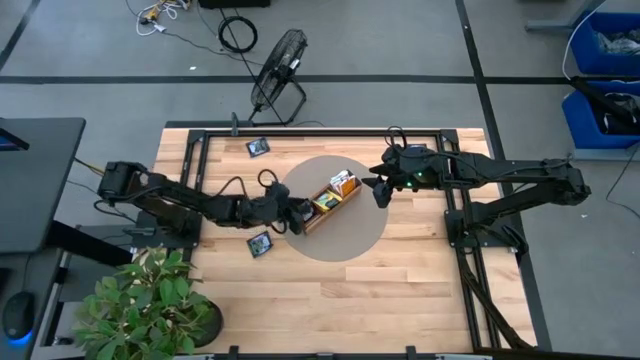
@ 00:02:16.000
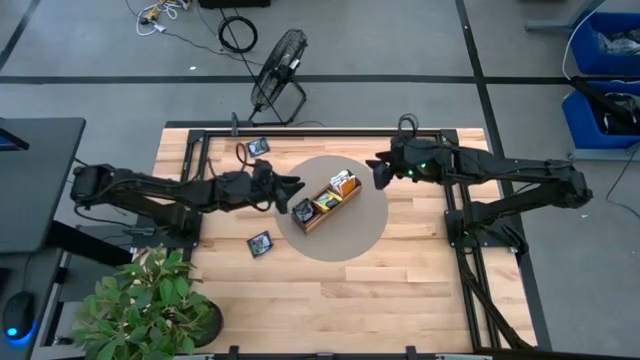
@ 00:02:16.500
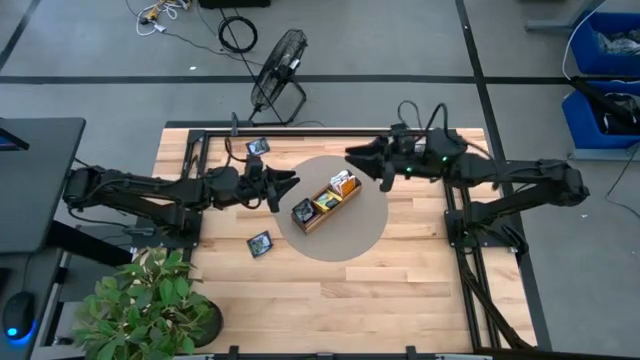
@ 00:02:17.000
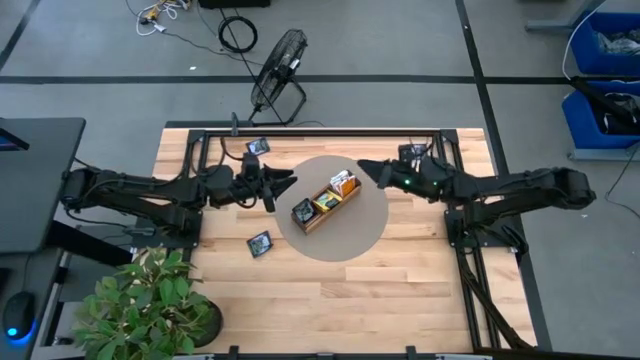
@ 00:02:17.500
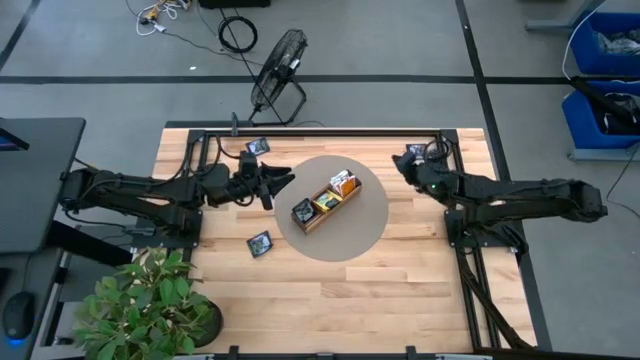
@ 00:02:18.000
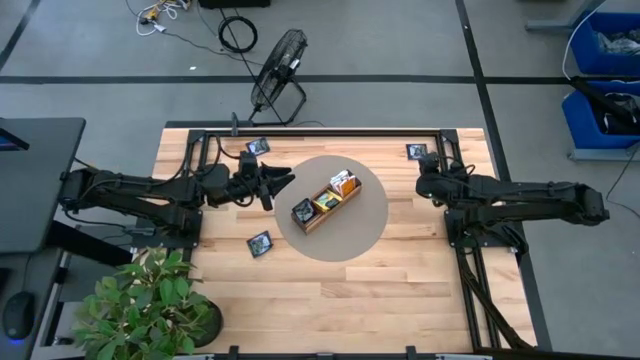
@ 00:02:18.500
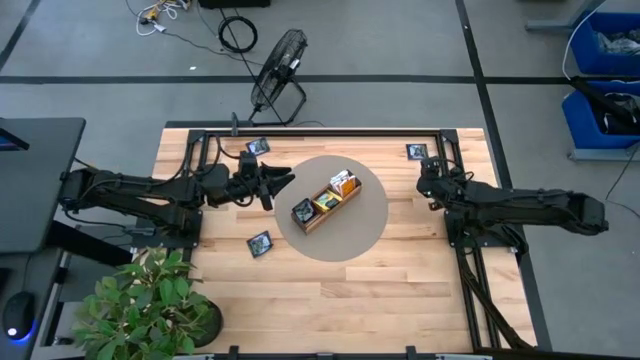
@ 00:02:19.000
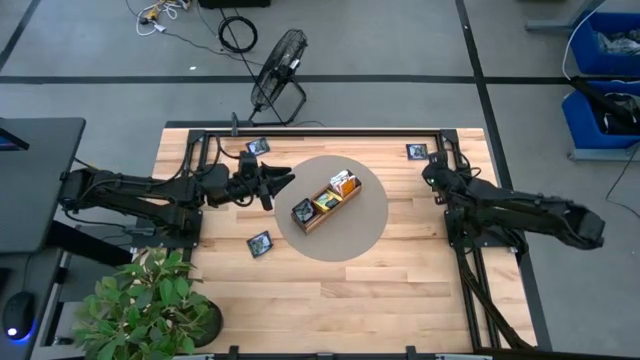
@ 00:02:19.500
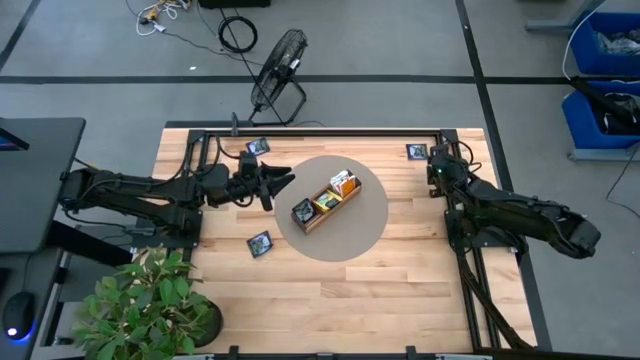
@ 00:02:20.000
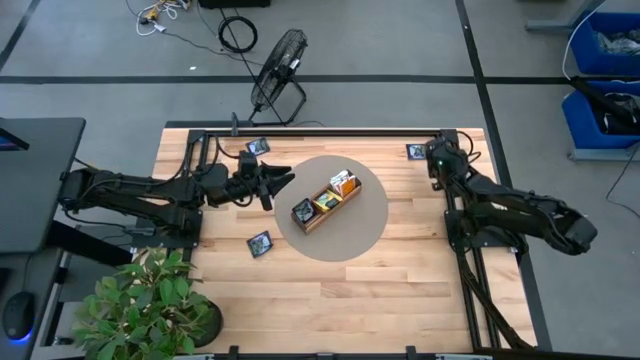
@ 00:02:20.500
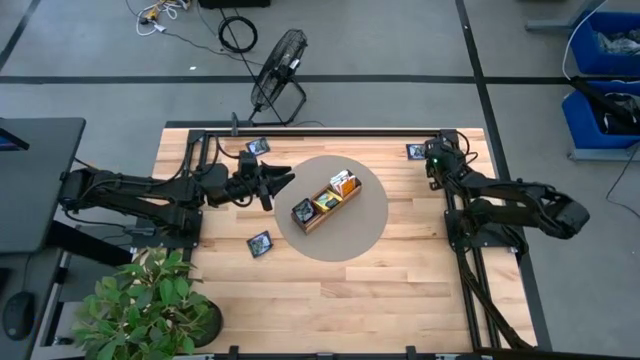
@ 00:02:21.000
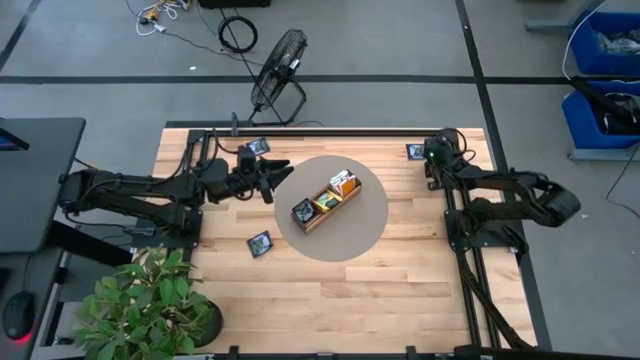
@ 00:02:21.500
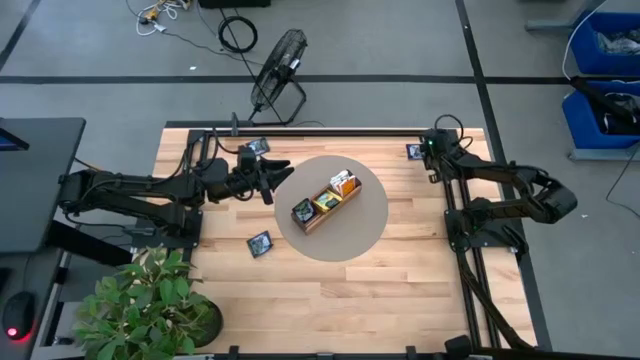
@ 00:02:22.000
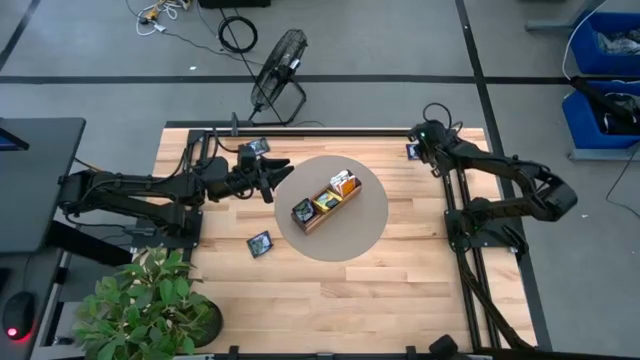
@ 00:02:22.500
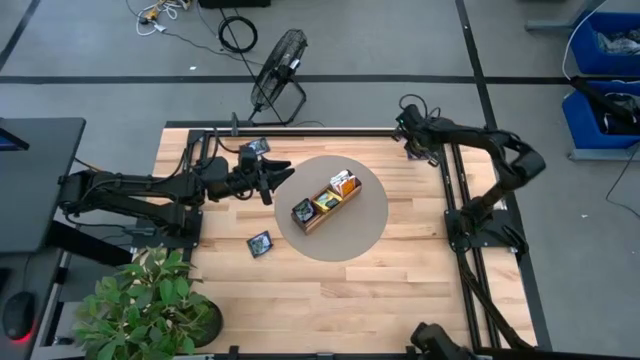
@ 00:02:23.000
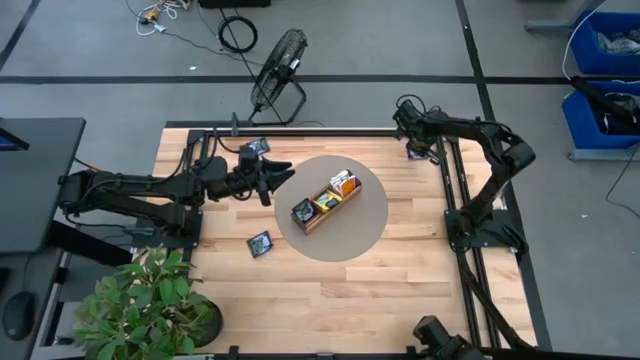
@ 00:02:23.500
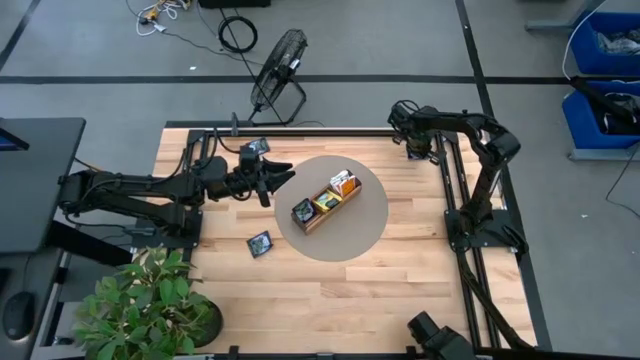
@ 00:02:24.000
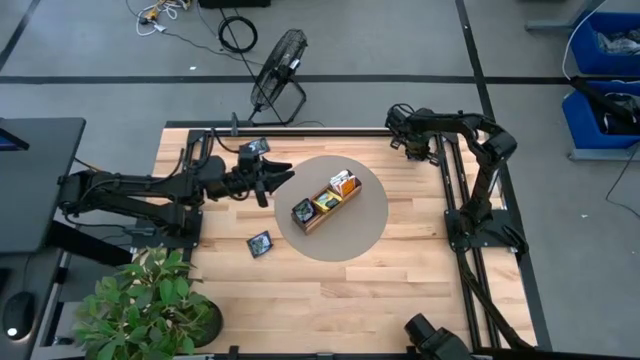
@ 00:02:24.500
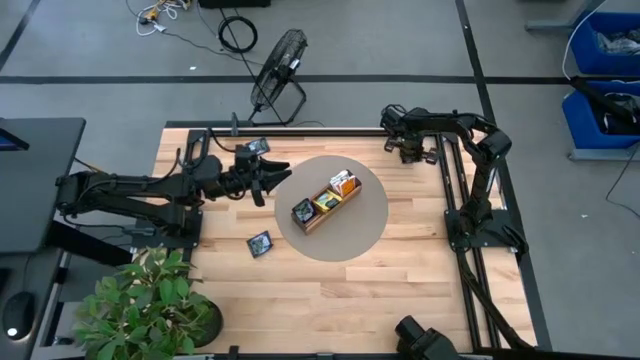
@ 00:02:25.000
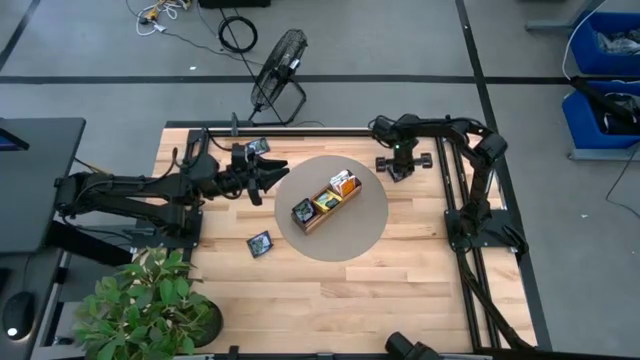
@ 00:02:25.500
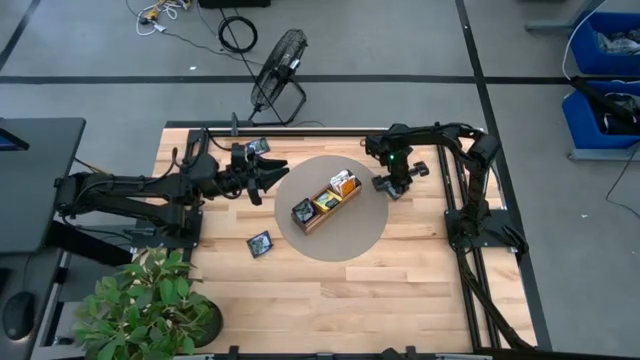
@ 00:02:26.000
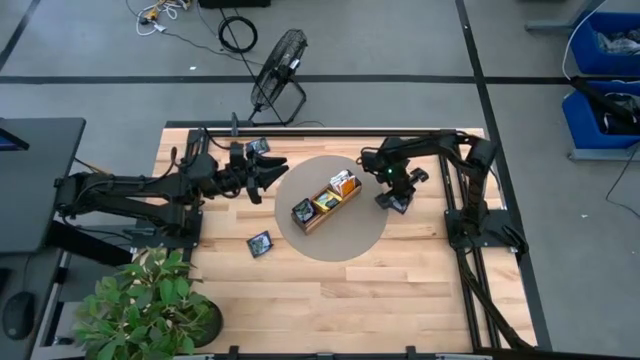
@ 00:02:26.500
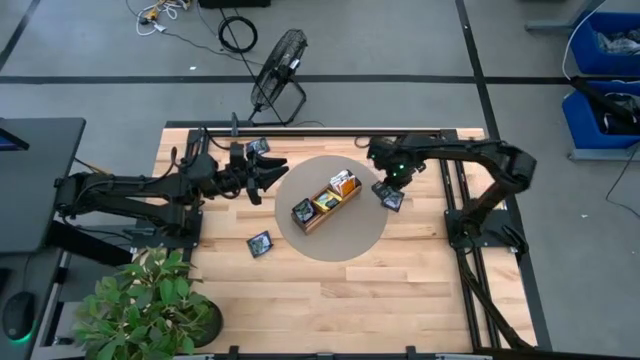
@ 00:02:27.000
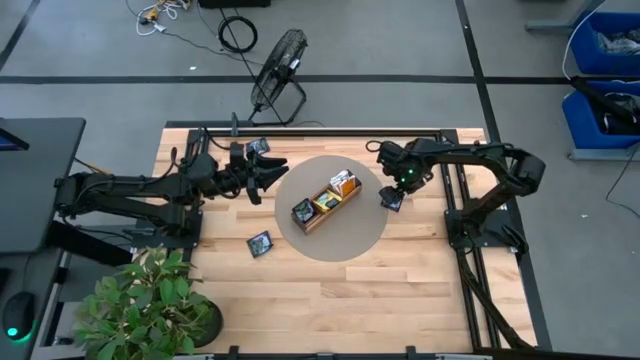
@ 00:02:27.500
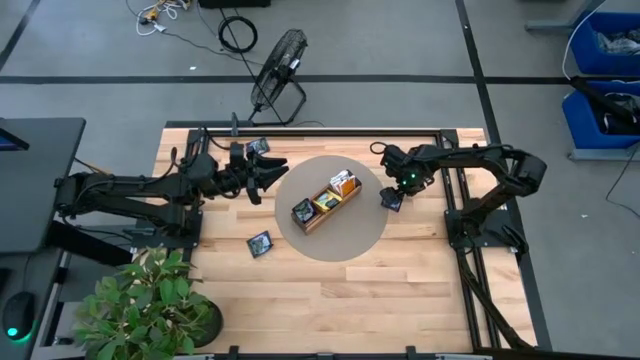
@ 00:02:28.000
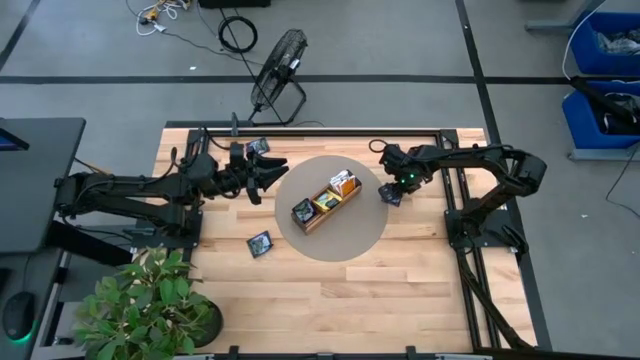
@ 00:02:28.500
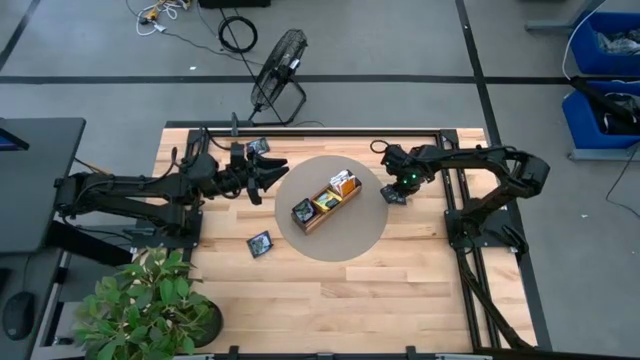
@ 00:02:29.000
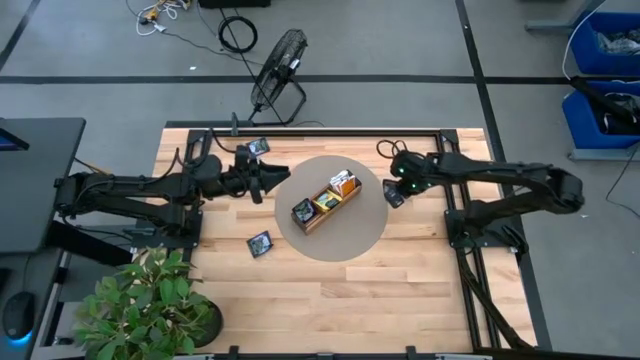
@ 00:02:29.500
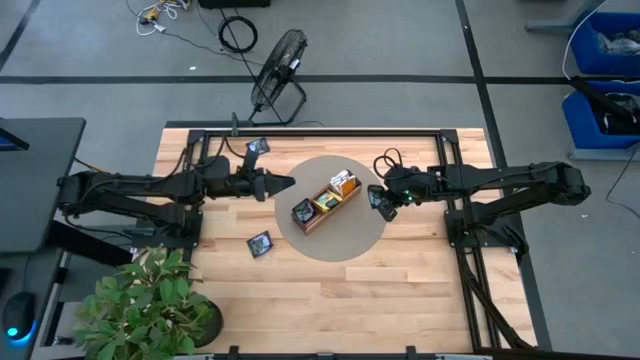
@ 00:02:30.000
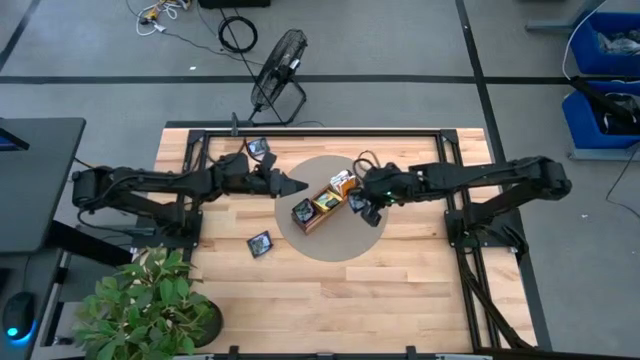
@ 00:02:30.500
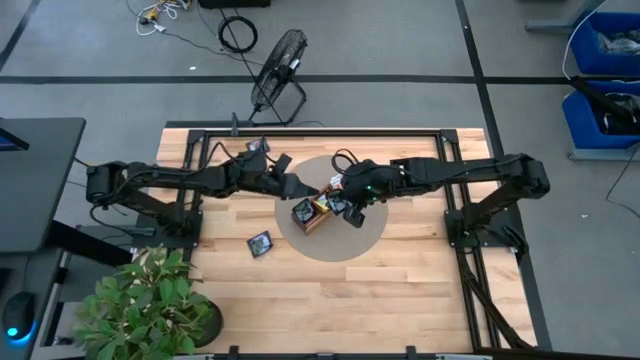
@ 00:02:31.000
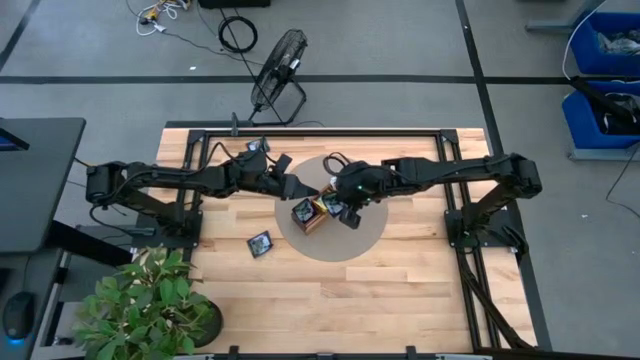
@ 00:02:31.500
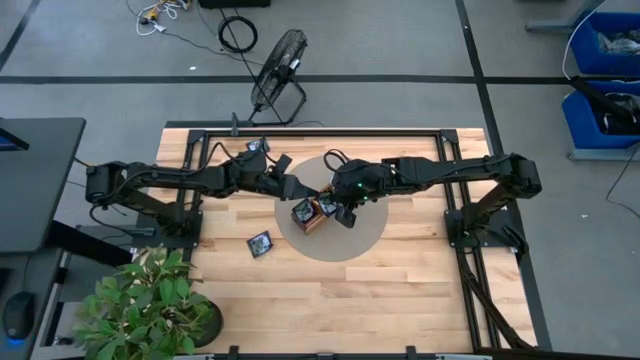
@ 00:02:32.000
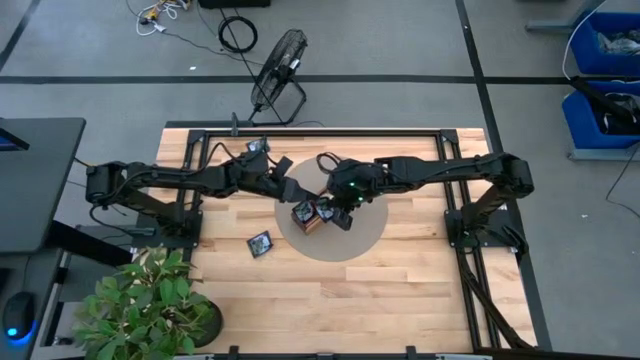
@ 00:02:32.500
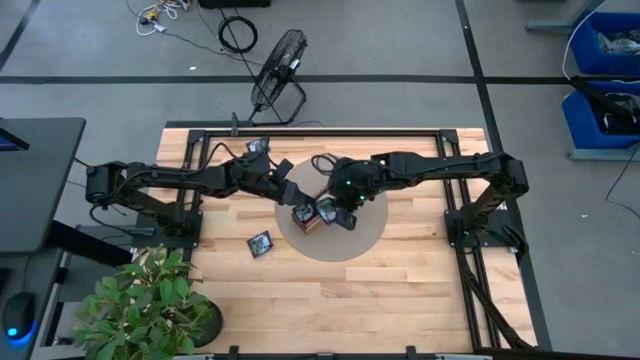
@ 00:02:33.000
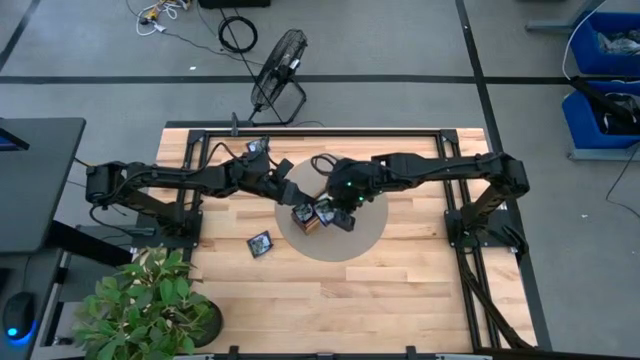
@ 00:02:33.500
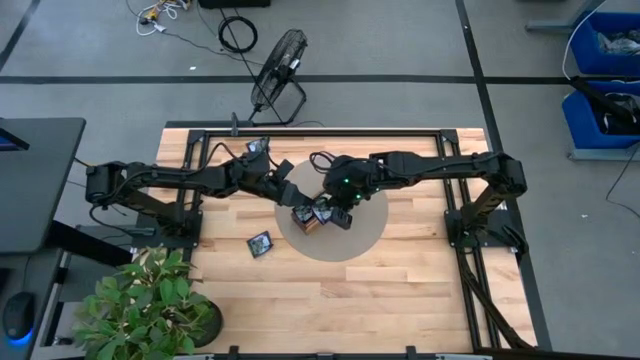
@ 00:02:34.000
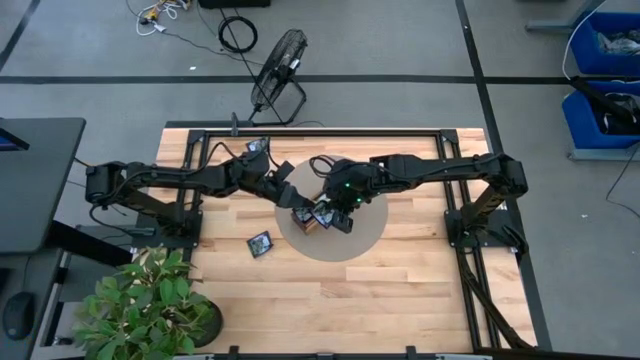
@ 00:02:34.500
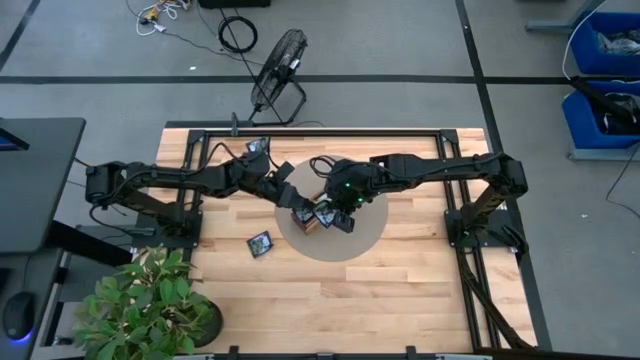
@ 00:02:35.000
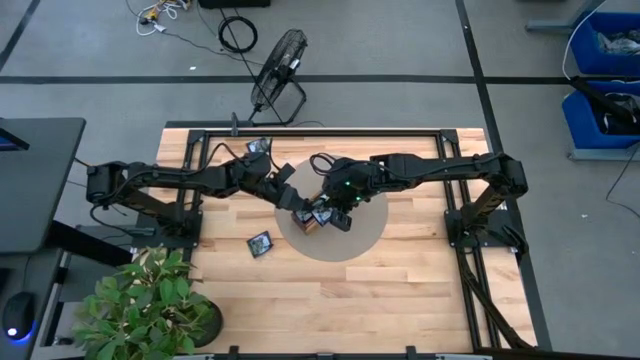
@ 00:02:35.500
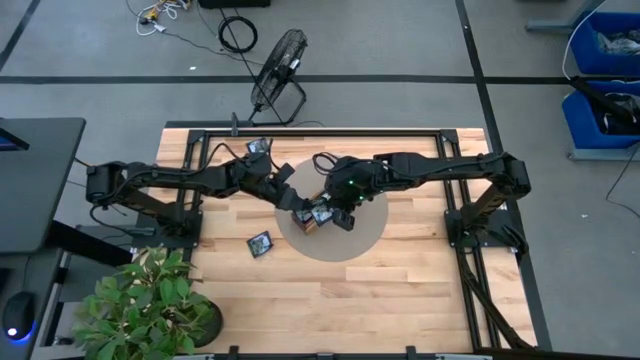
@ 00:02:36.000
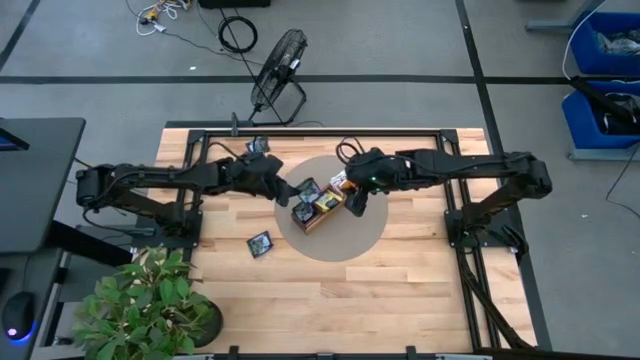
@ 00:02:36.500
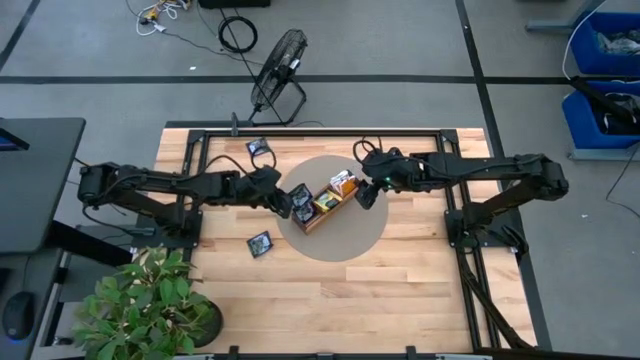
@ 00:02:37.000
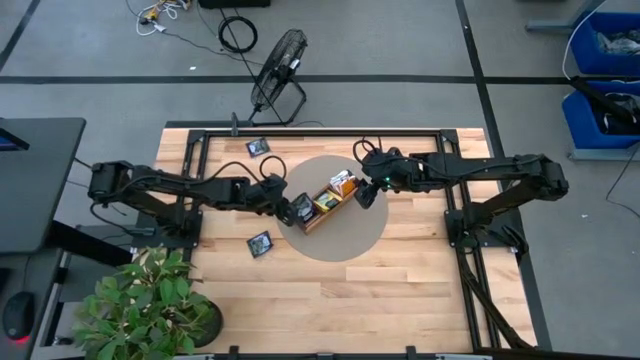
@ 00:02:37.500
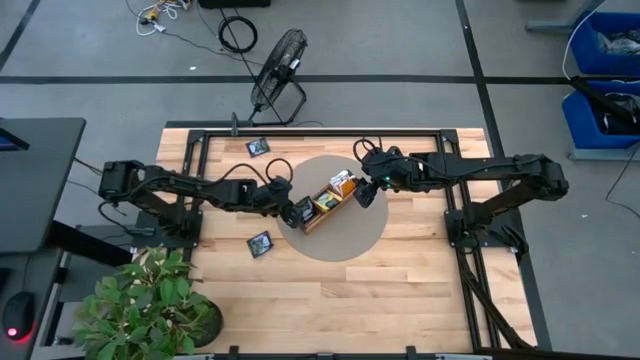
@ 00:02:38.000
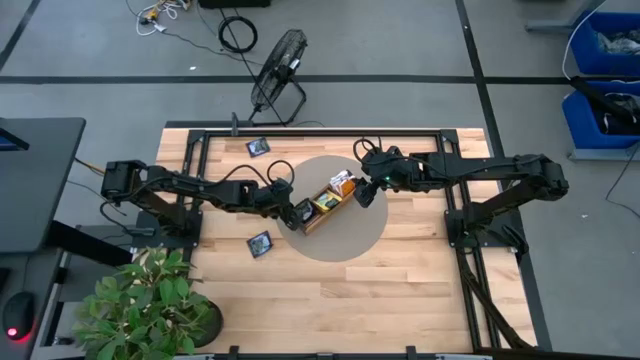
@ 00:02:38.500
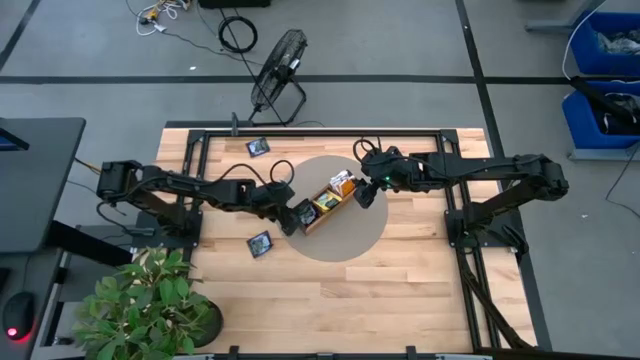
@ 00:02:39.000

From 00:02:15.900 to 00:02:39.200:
Task: Pick & Place Tea
Put the black tea bag into the left section of the wooden organizer
